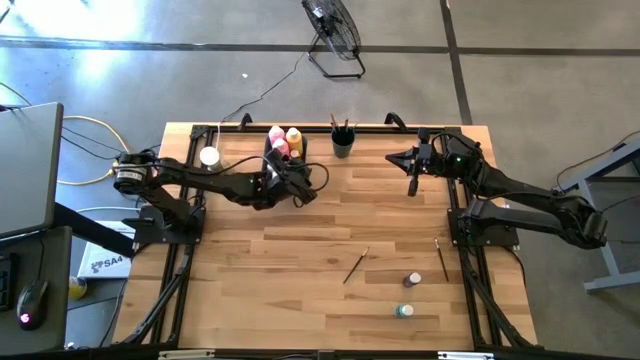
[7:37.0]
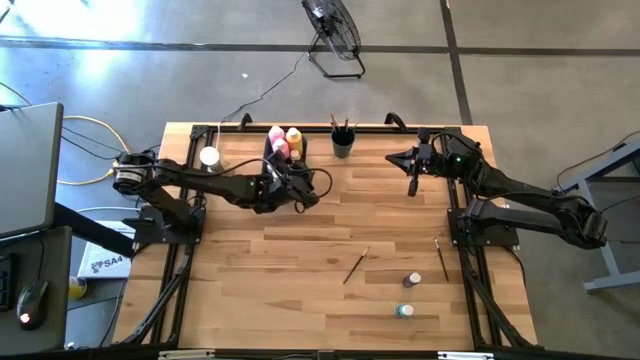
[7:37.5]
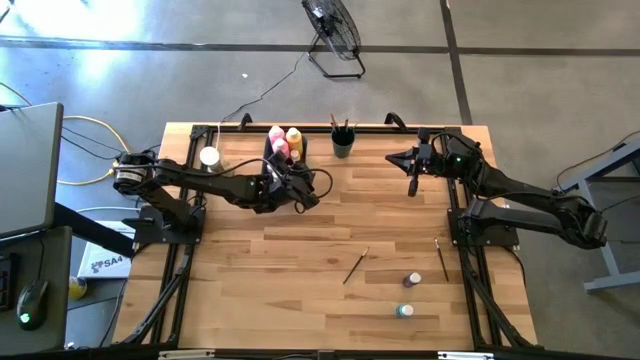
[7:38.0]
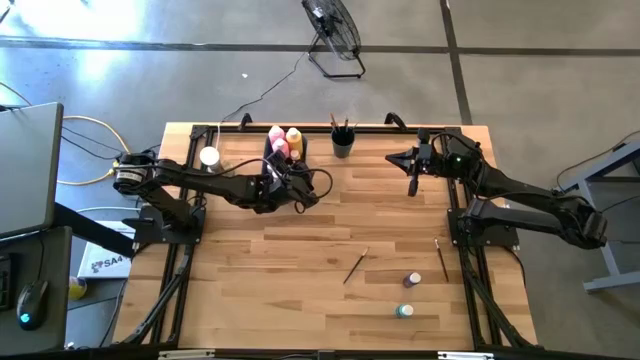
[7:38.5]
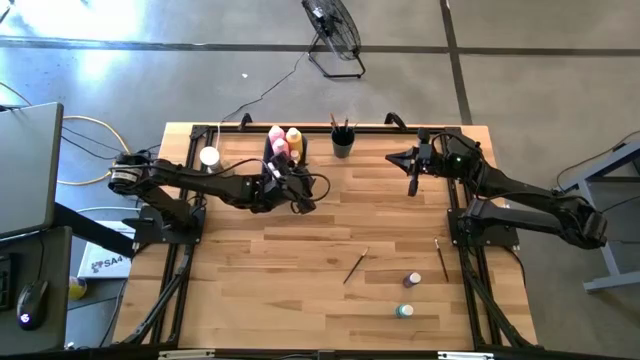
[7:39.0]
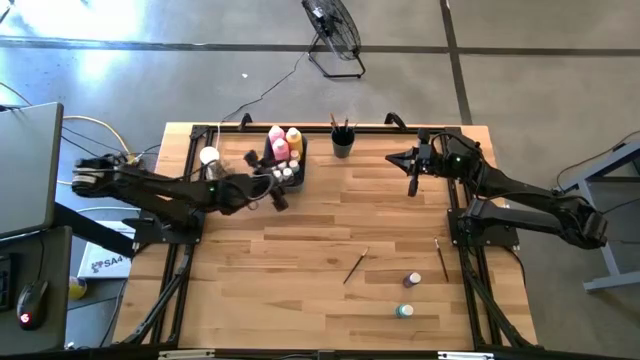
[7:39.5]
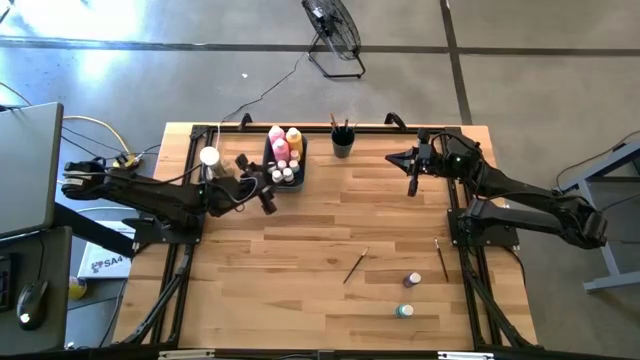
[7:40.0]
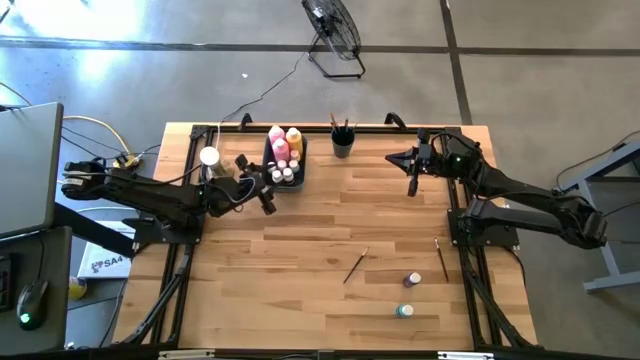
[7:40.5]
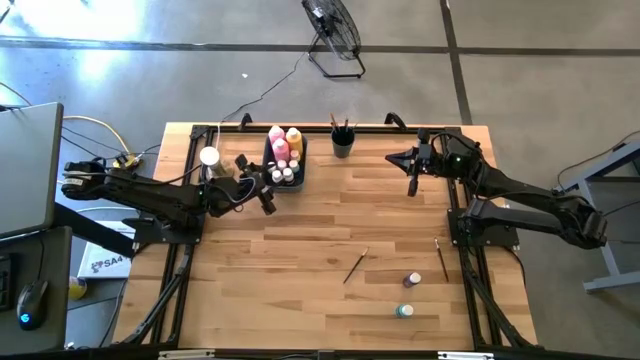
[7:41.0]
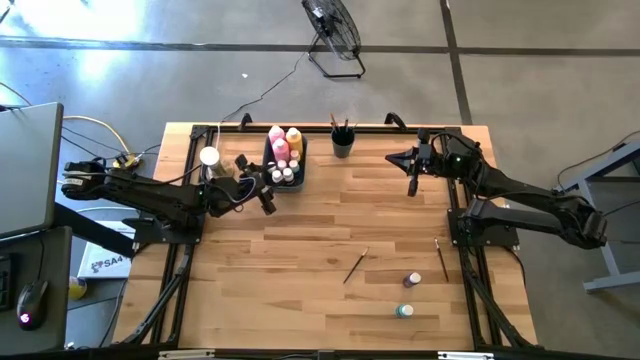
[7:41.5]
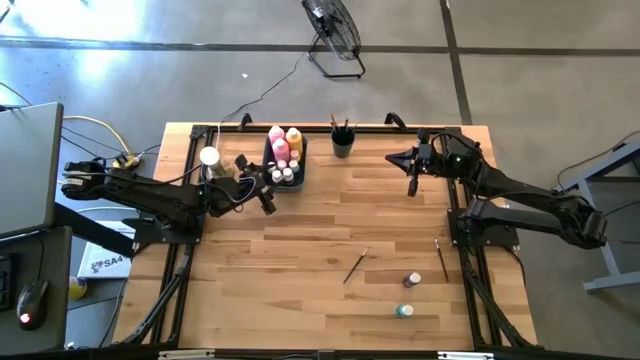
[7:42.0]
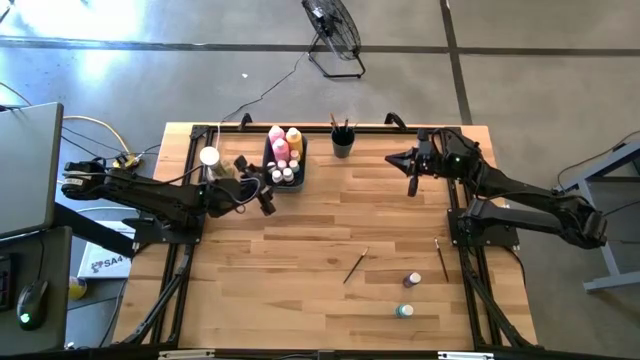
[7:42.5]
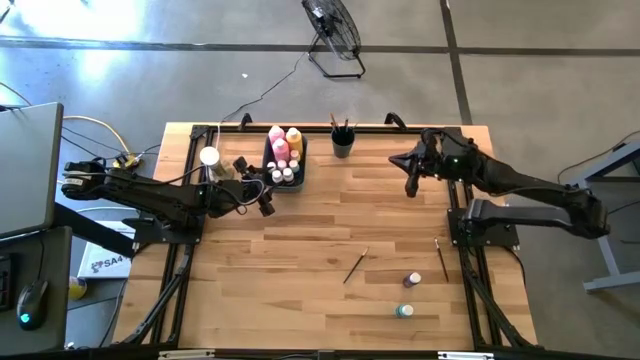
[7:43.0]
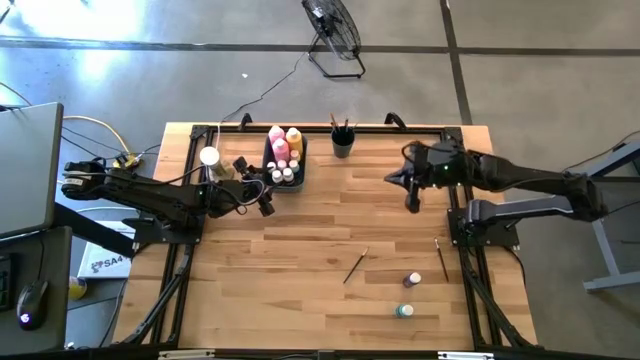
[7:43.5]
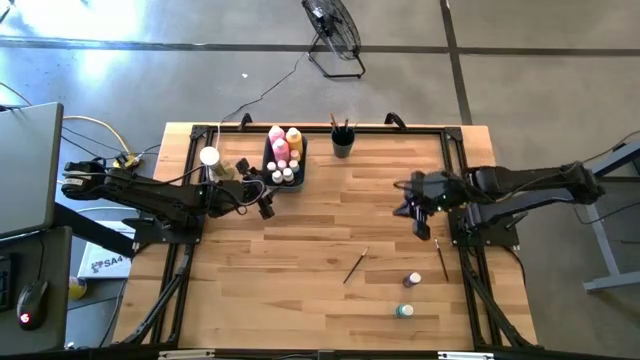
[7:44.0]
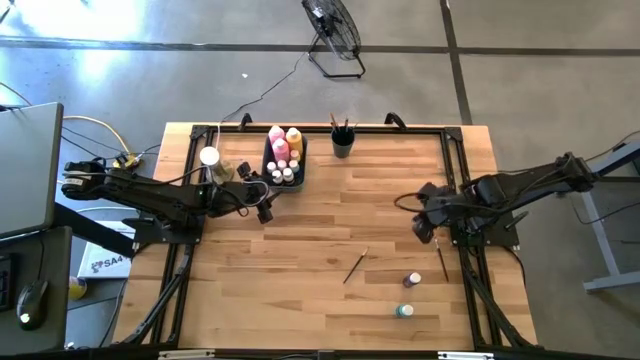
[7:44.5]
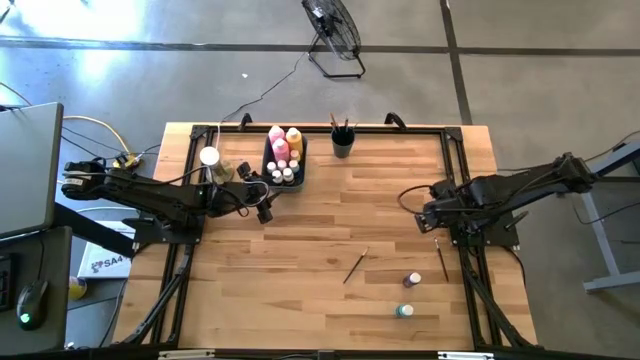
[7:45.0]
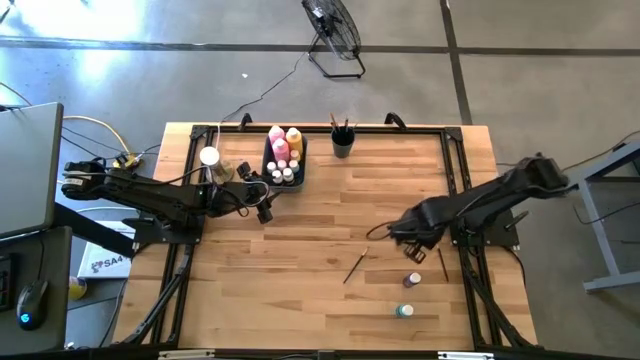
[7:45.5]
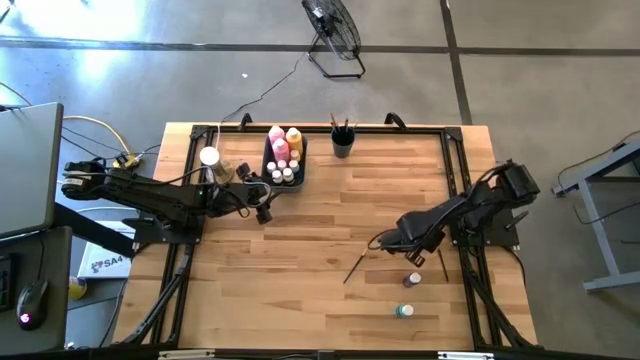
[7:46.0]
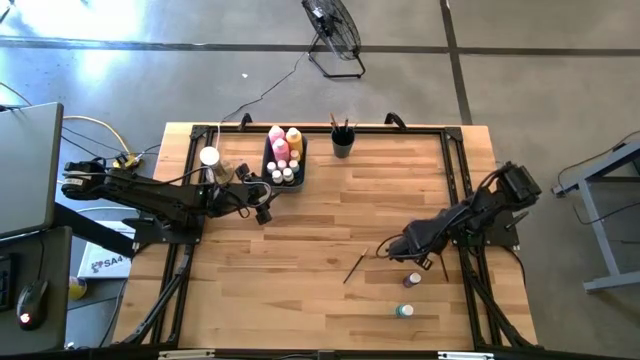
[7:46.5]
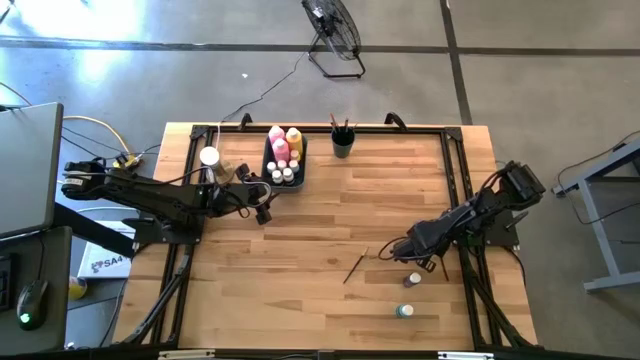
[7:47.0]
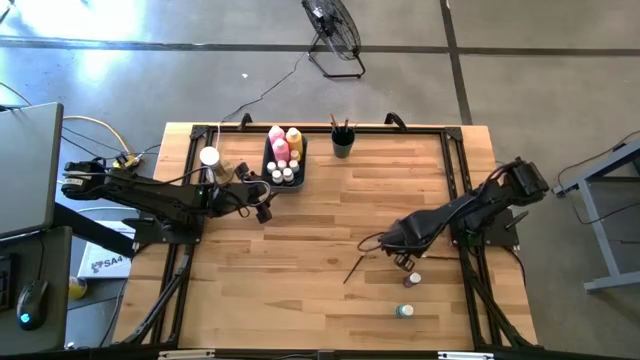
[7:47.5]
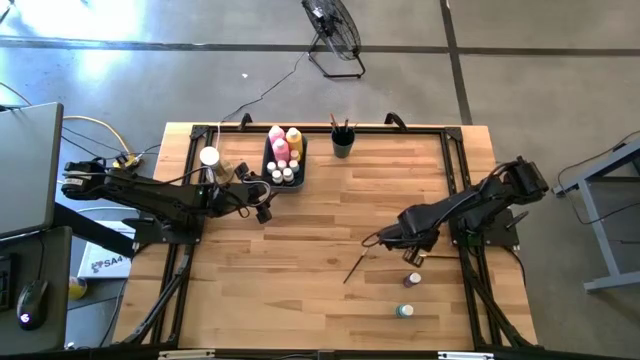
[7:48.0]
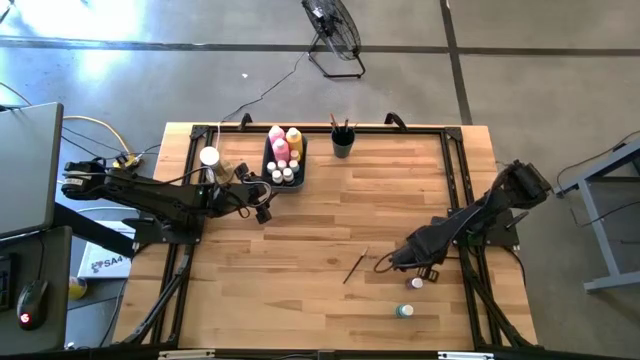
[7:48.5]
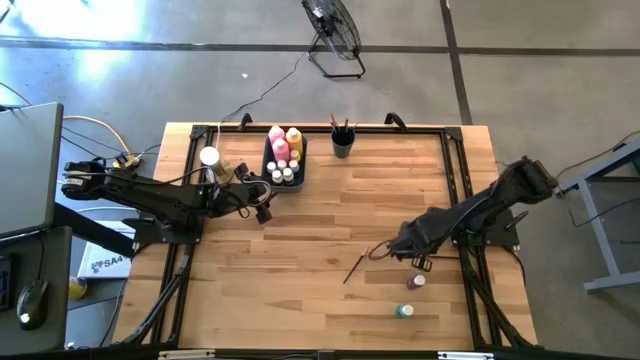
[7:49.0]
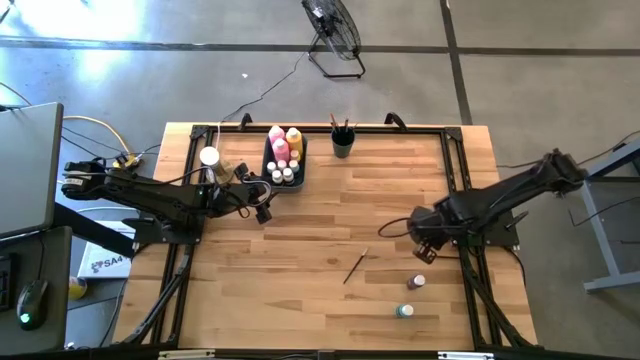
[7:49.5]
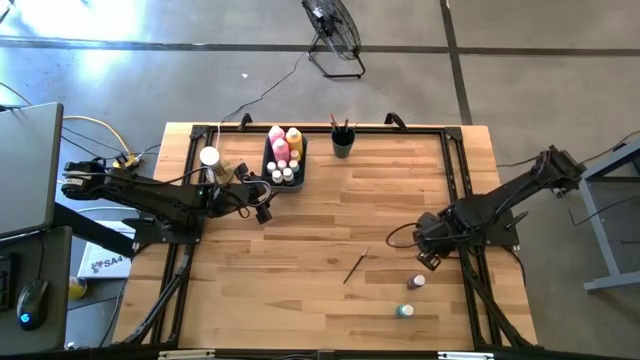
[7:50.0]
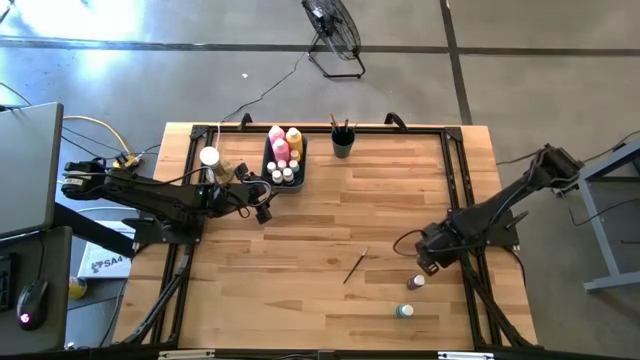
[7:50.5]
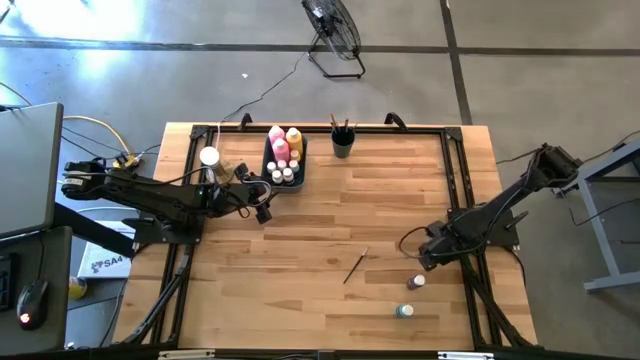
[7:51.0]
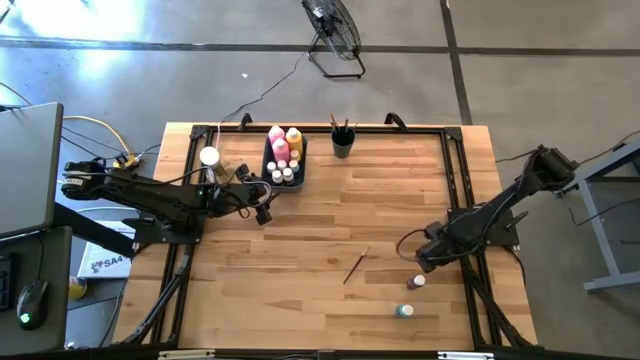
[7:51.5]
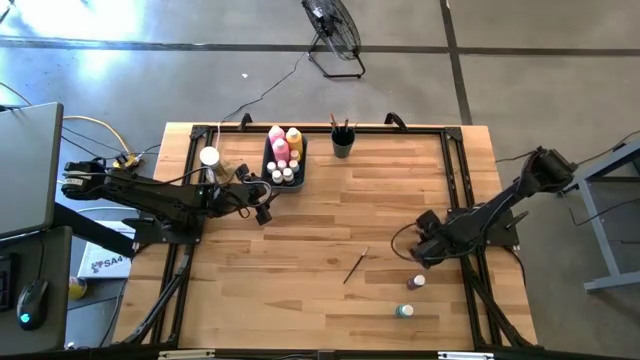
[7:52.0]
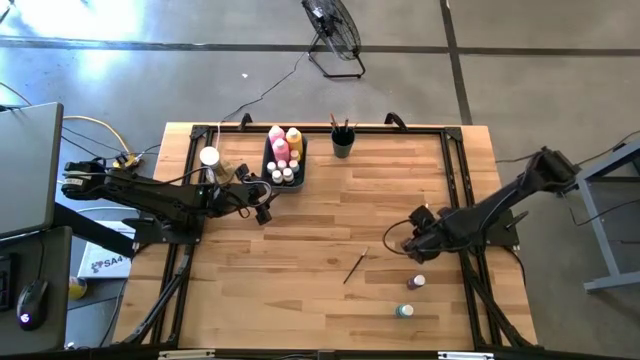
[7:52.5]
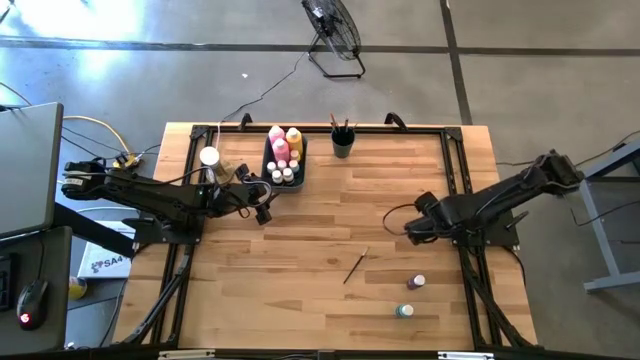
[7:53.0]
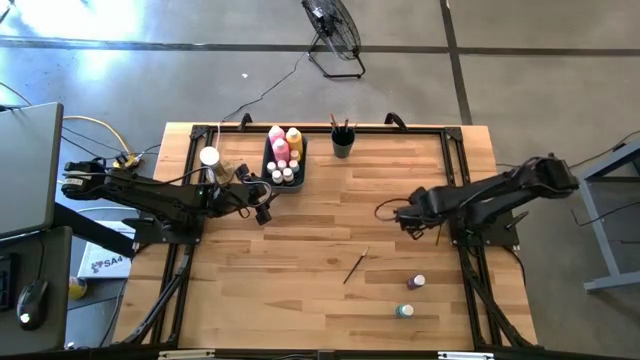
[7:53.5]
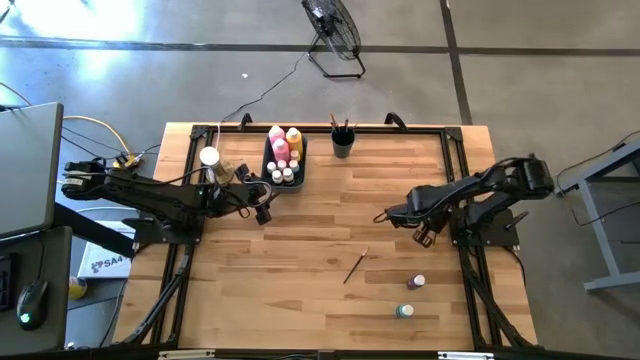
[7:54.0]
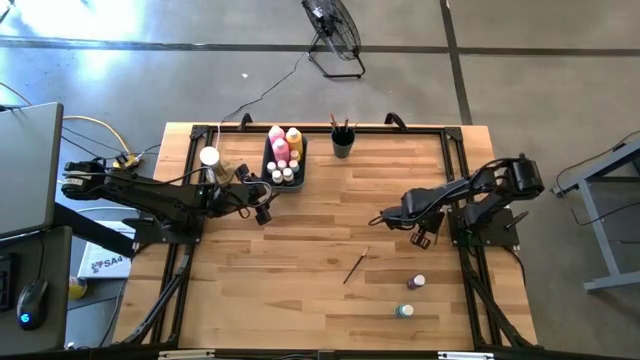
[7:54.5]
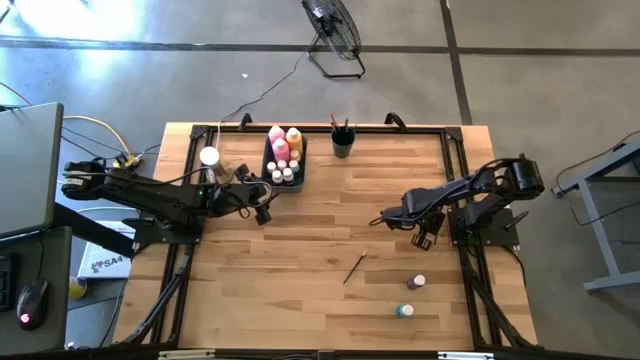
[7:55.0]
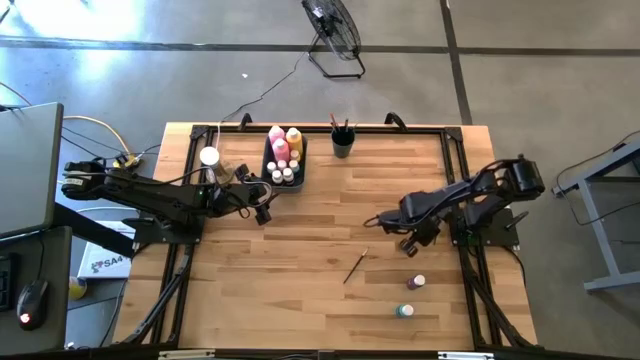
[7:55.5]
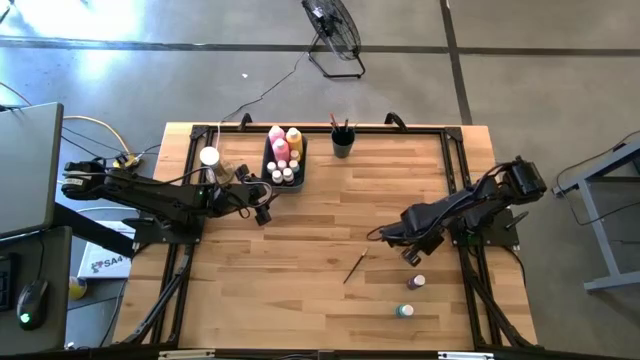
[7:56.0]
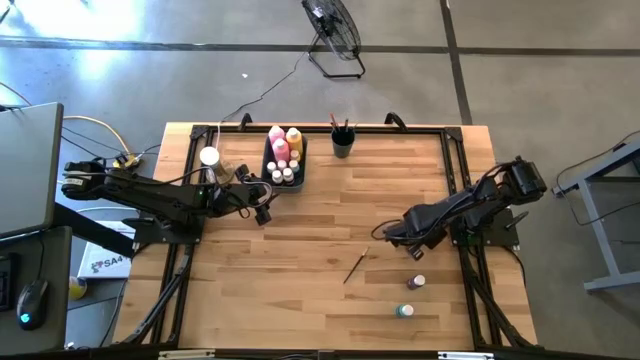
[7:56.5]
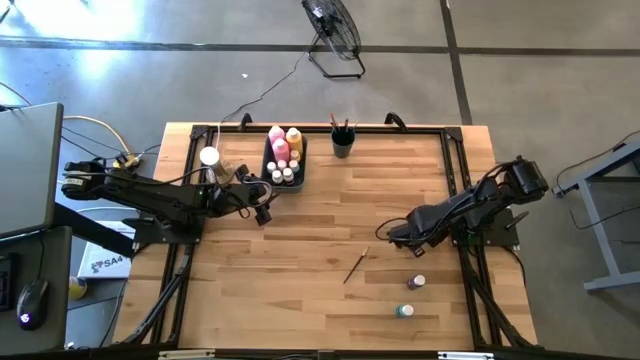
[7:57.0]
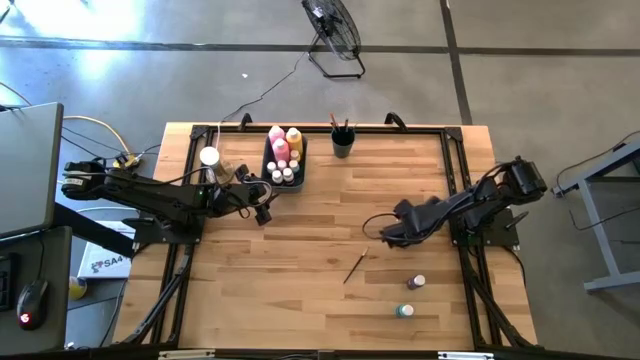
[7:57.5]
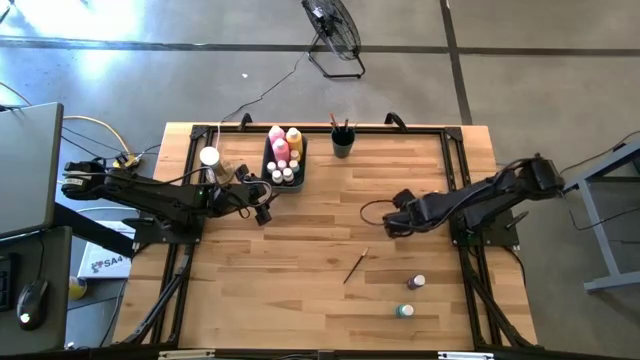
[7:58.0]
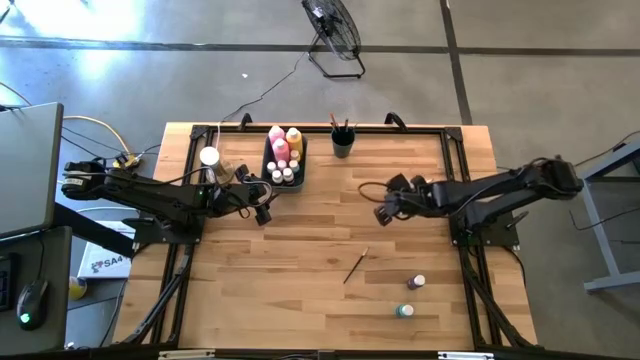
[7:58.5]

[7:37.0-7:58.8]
Task: Pick & Place Paint Supplies
Put the silver paint brush into the green cup
